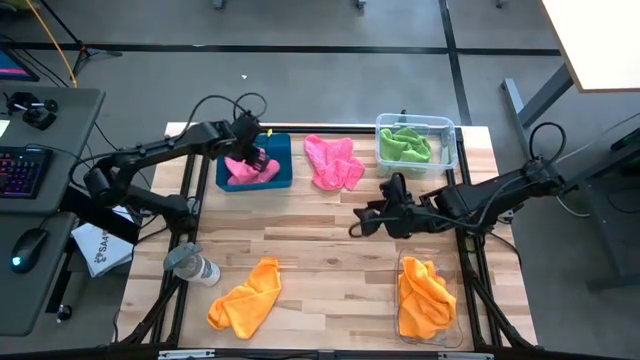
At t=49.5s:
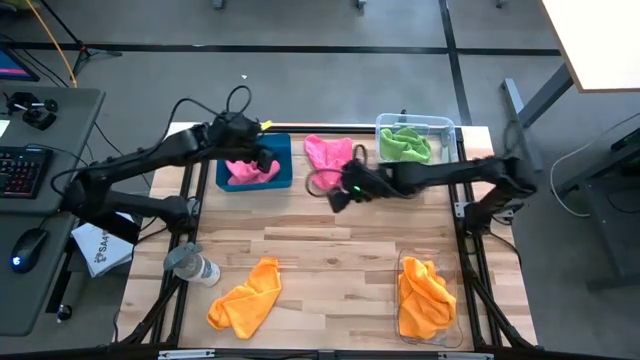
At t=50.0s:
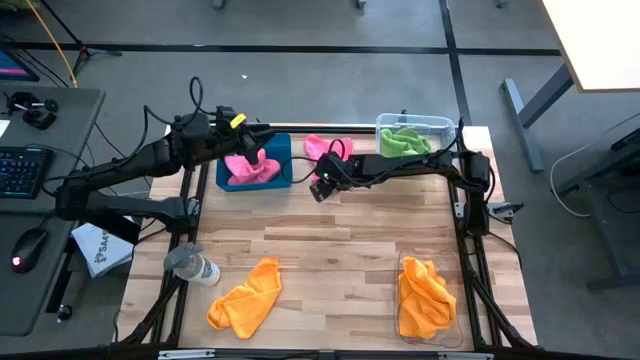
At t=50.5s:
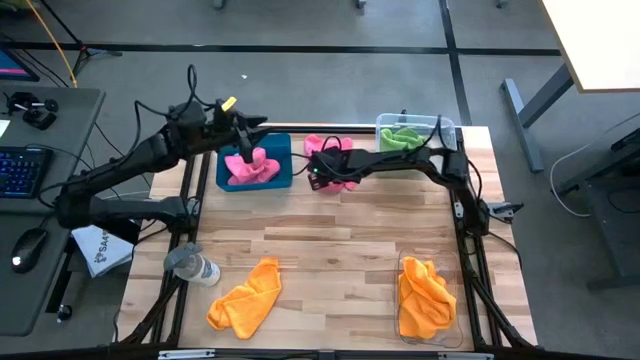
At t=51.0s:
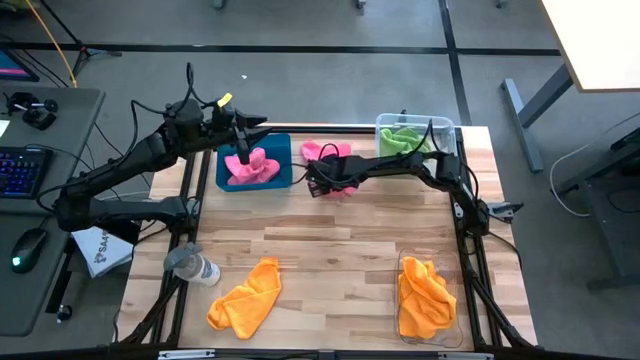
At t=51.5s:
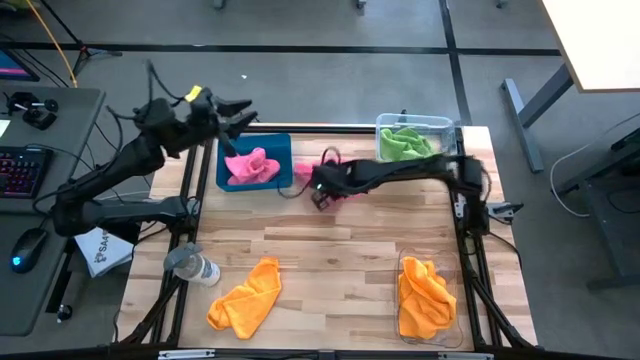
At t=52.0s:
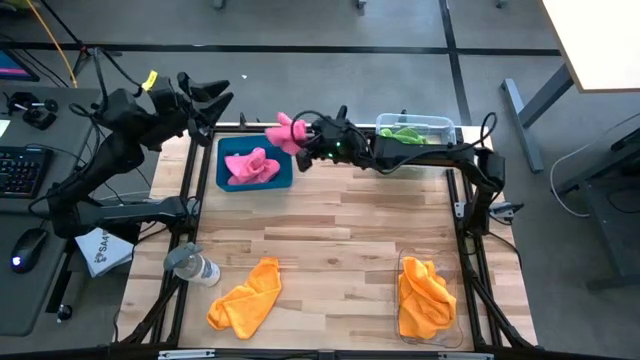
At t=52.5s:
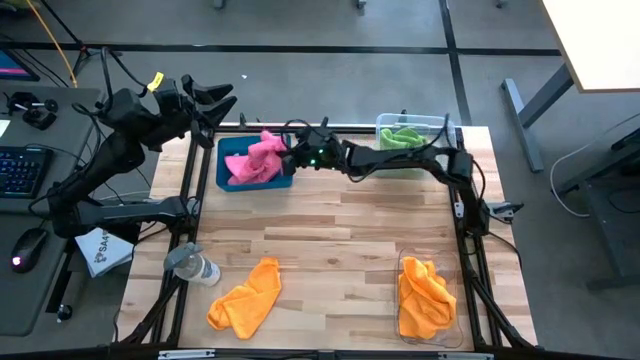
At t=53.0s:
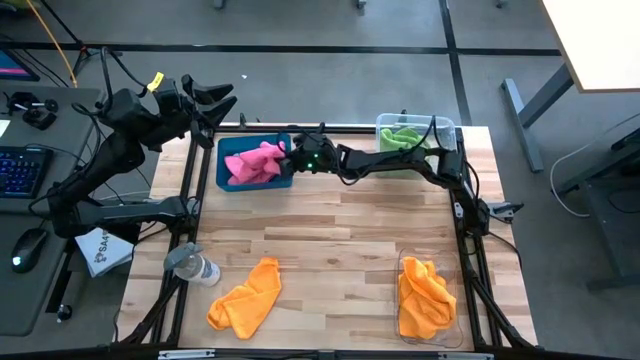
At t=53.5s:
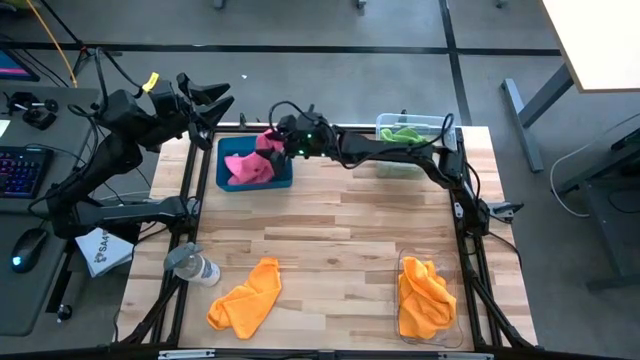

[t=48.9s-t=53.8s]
Task: Sort microfiber towel by color & place in baskets
Put the pink towel into blue bin

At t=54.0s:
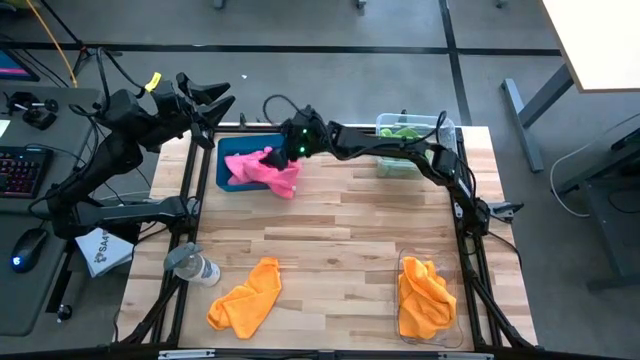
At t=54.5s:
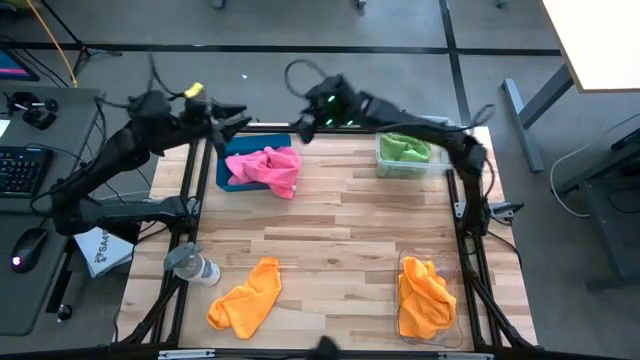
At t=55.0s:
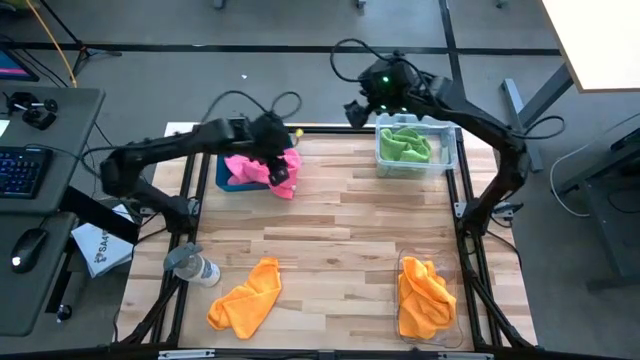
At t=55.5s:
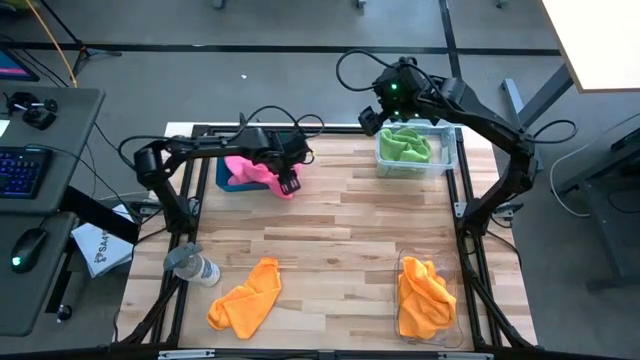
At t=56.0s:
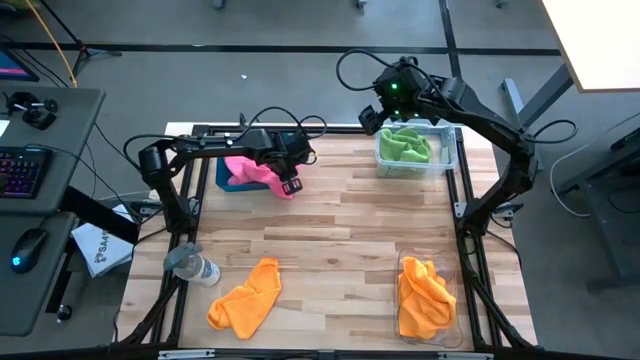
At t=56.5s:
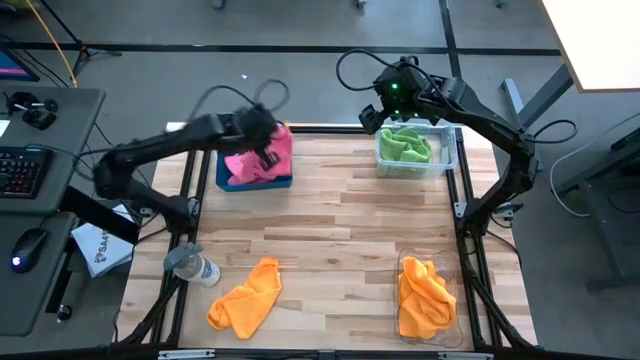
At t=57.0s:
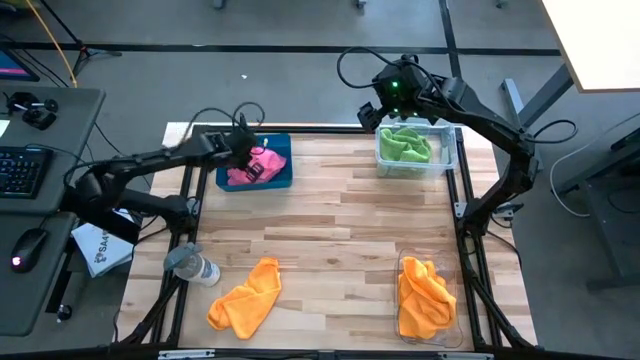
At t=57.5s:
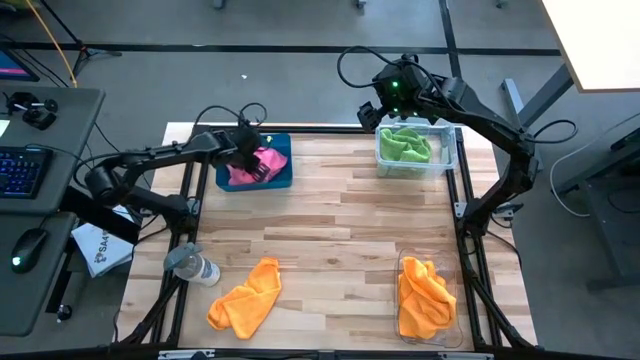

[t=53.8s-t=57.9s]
Put the pink towel into blue bin

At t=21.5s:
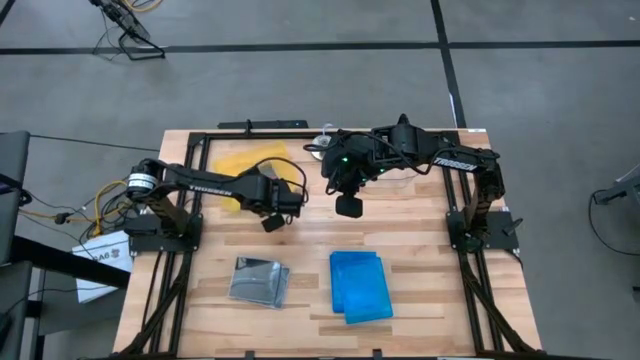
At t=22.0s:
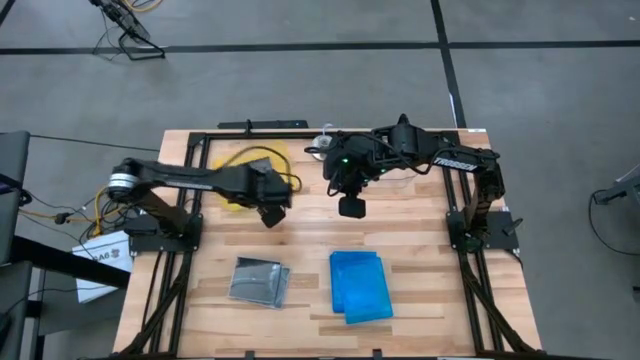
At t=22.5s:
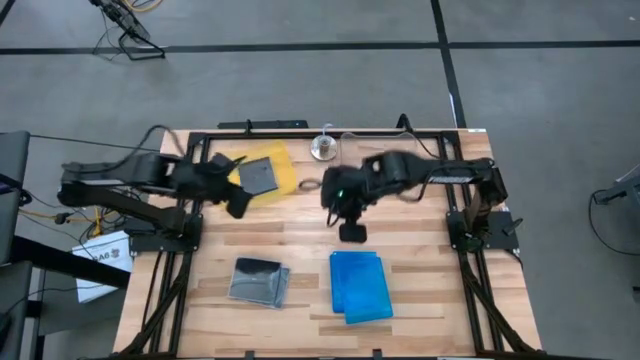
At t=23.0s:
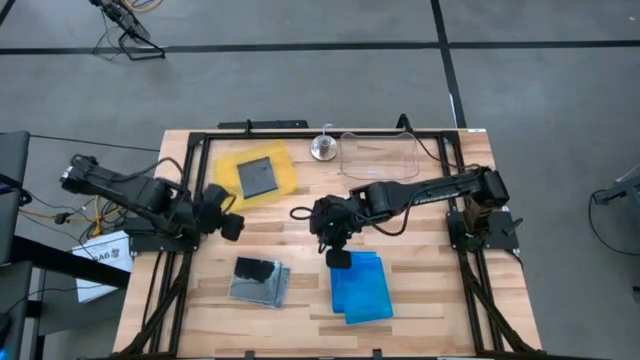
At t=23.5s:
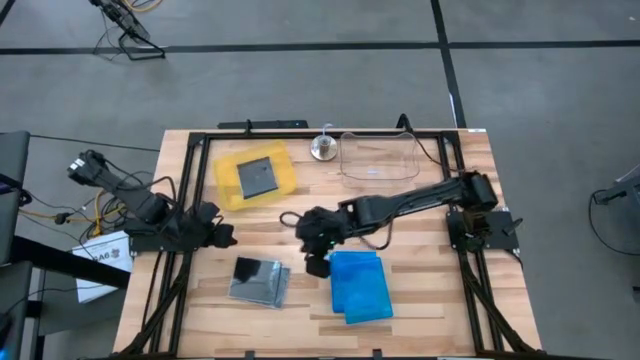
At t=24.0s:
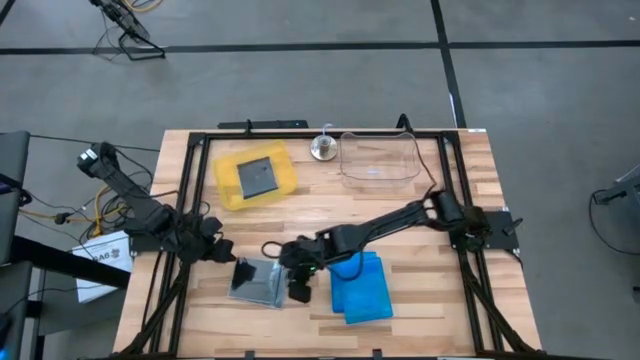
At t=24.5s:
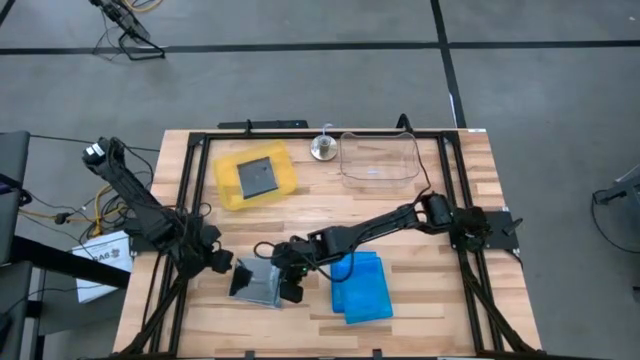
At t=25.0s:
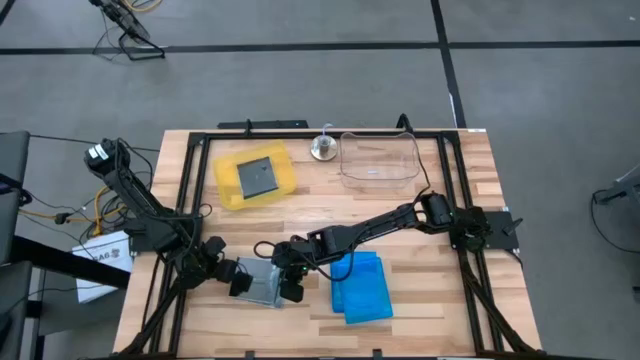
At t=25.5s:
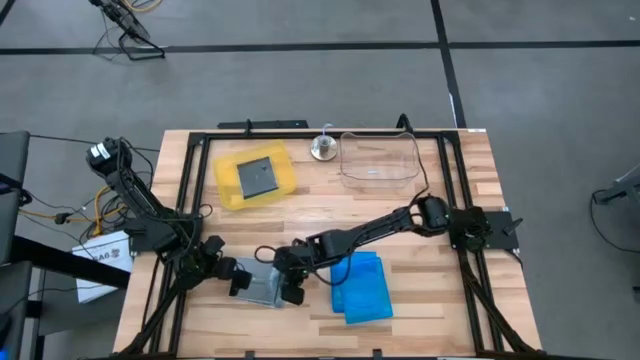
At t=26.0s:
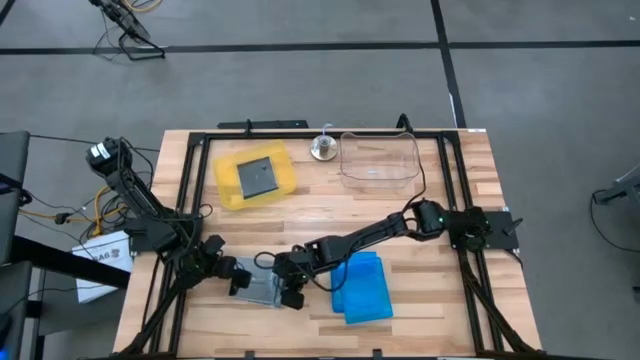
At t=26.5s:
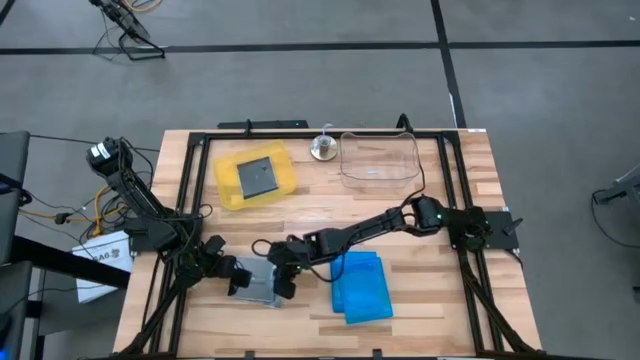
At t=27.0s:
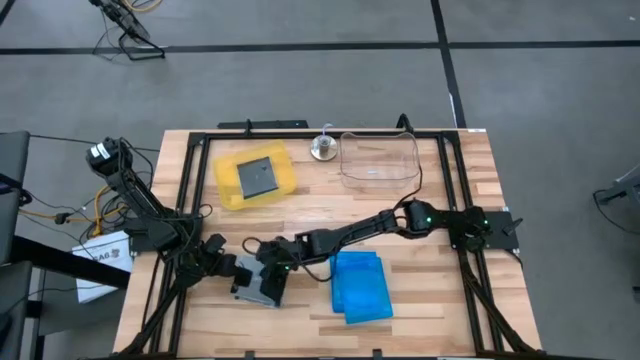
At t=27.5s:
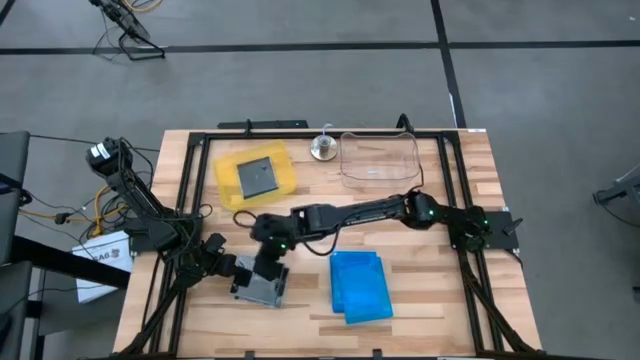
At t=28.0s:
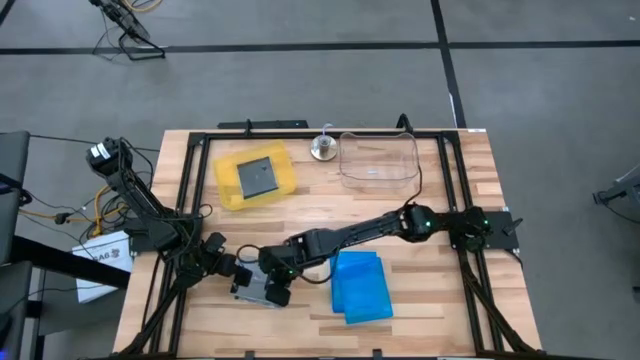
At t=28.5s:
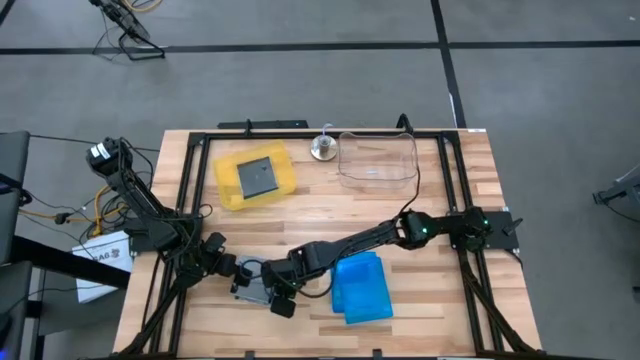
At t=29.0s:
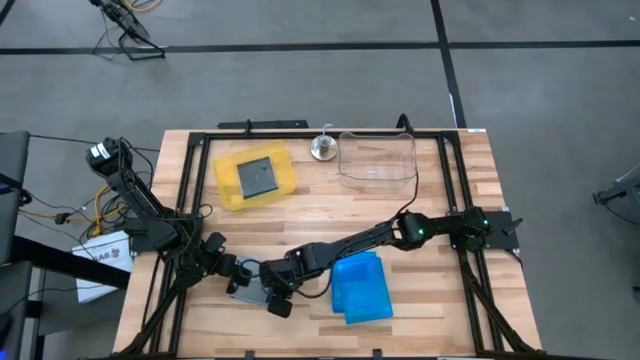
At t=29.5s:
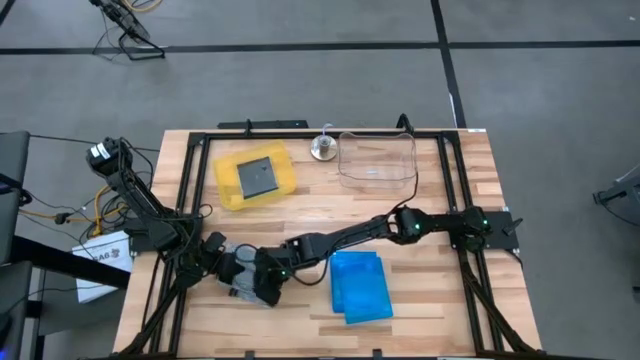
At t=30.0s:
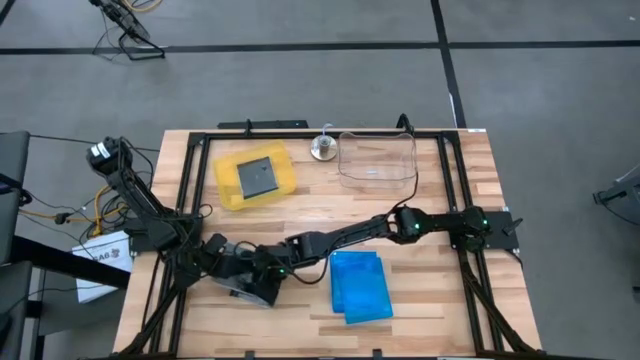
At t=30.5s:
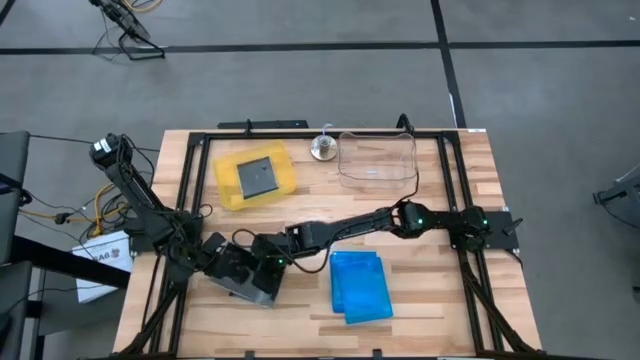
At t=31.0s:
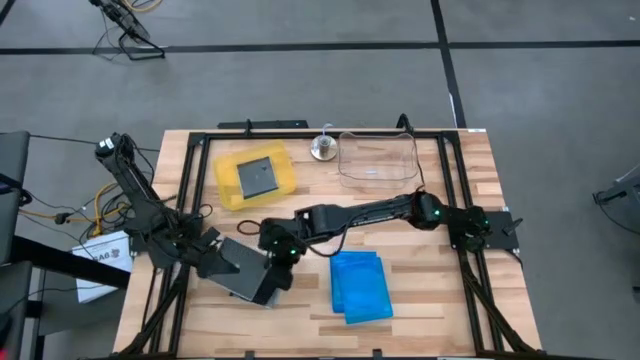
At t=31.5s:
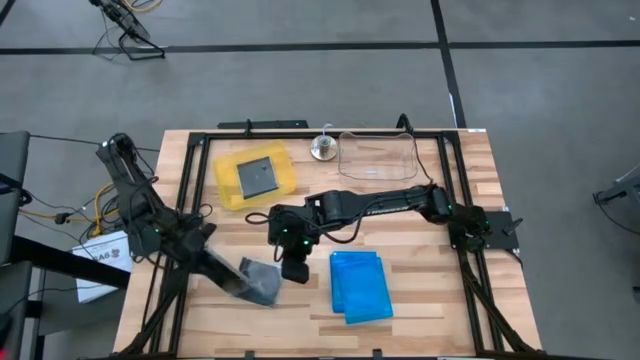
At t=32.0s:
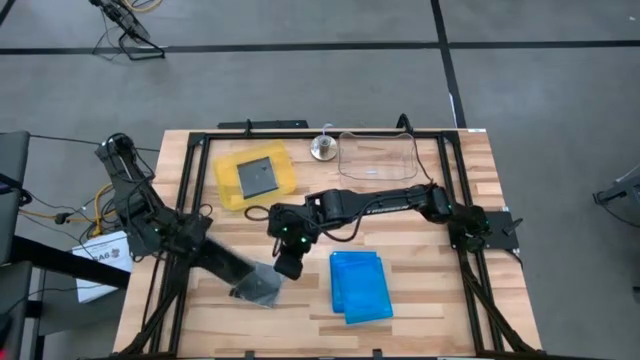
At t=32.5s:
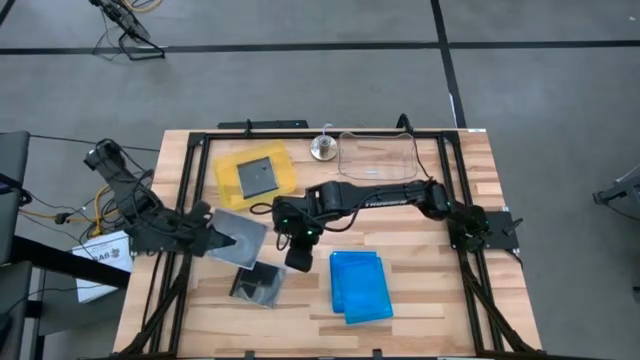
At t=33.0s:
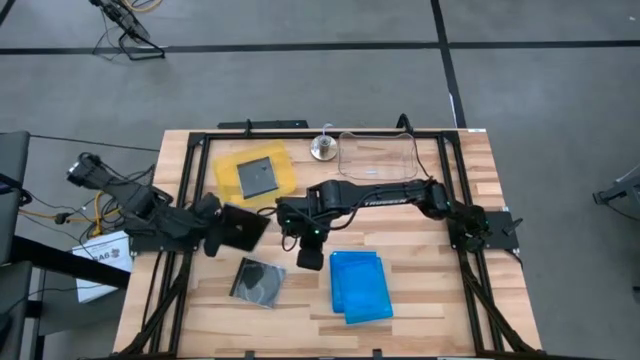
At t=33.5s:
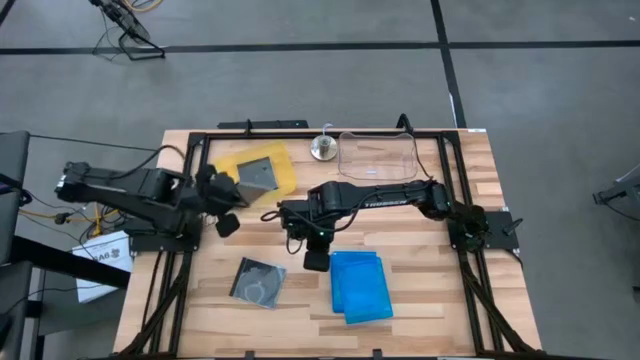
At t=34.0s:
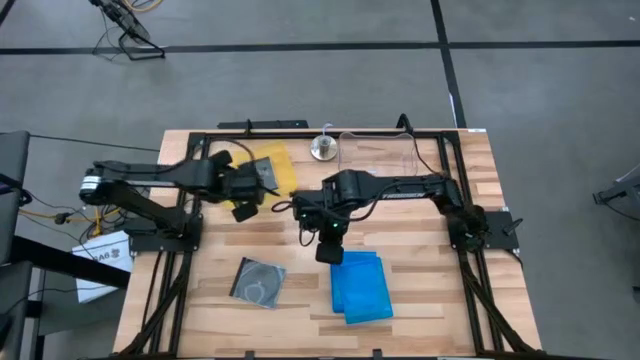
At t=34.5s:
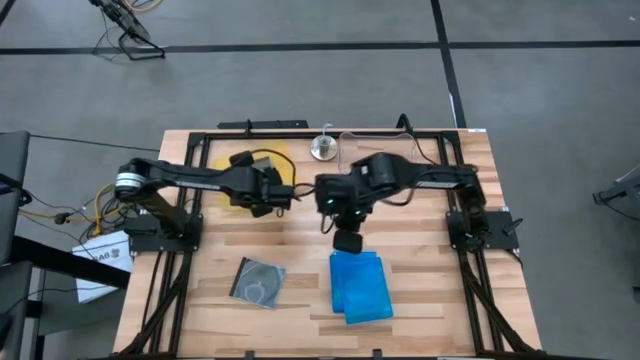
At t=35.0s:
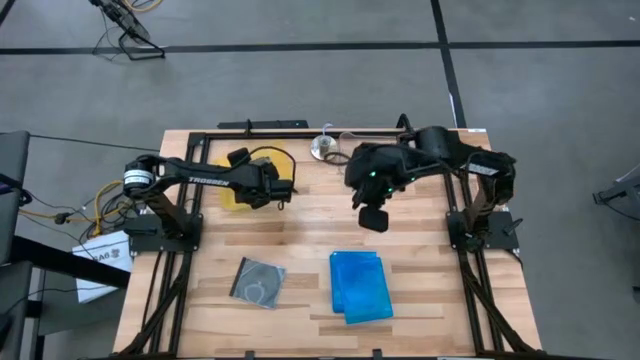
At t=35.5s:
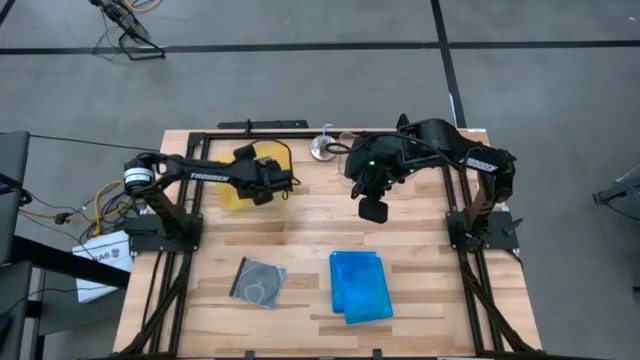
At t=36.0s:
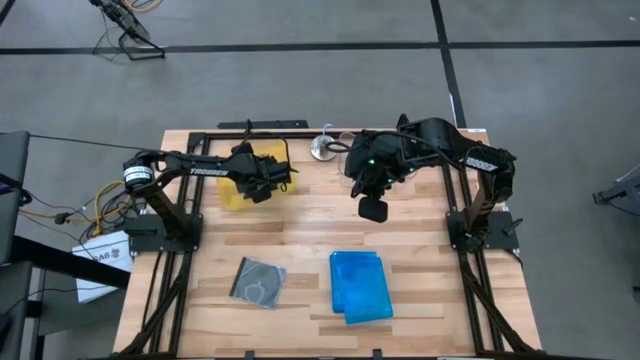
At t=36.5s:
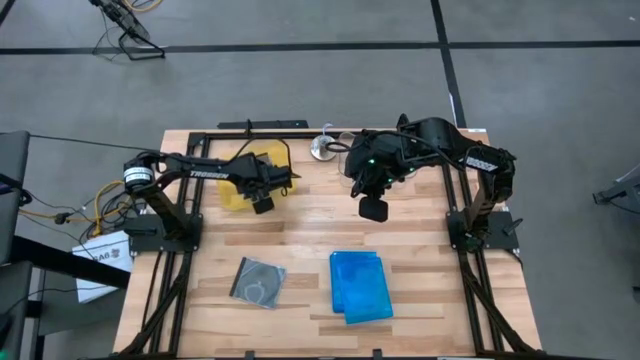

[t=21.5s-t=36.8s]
Task: Pick & place jewel cases by type
Put the top black CD case into the yellow bin
